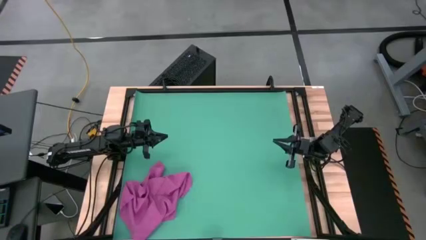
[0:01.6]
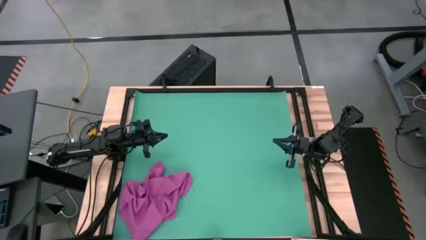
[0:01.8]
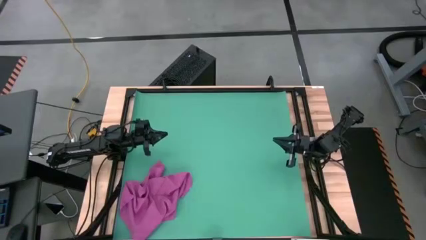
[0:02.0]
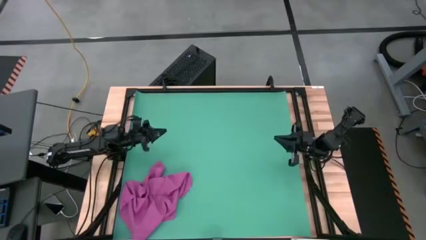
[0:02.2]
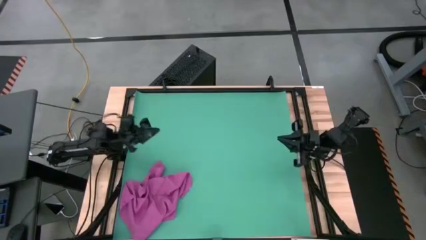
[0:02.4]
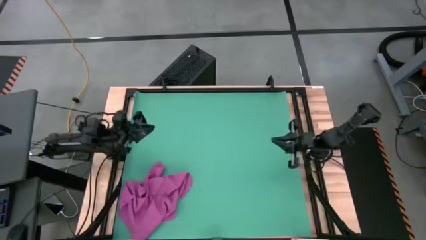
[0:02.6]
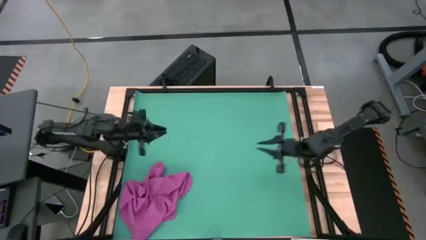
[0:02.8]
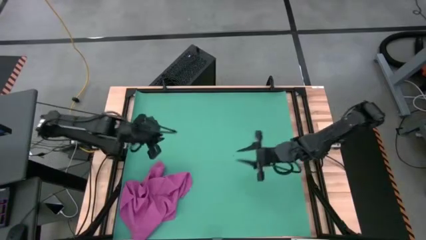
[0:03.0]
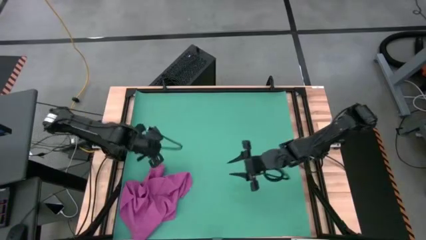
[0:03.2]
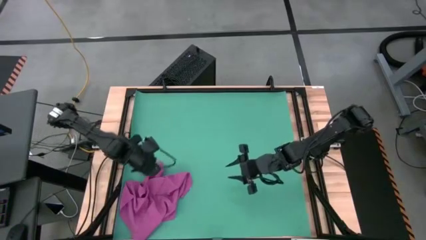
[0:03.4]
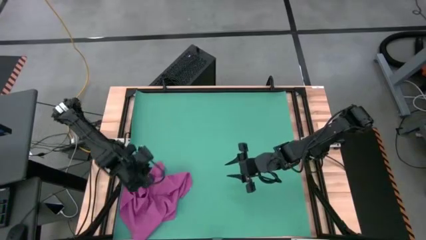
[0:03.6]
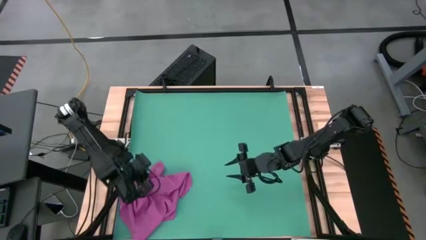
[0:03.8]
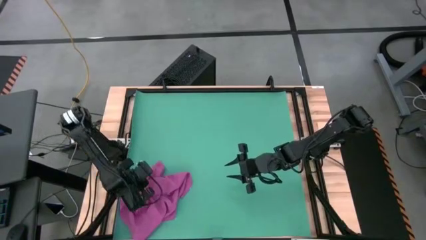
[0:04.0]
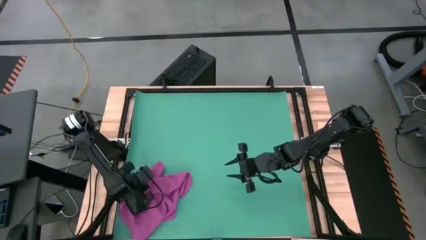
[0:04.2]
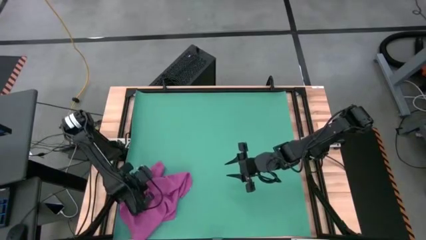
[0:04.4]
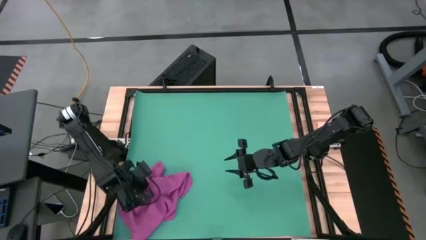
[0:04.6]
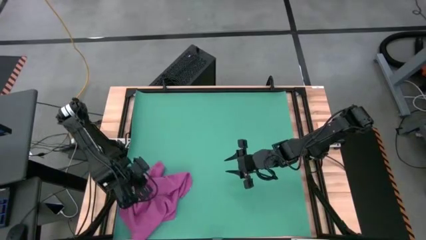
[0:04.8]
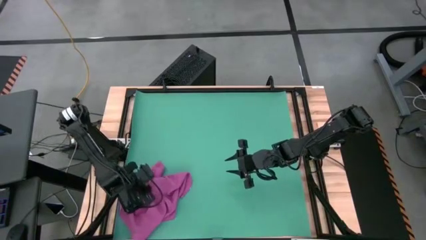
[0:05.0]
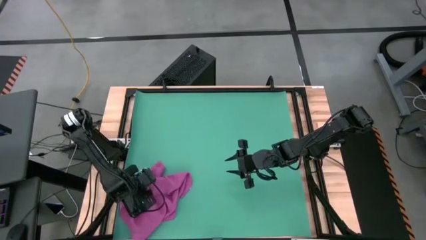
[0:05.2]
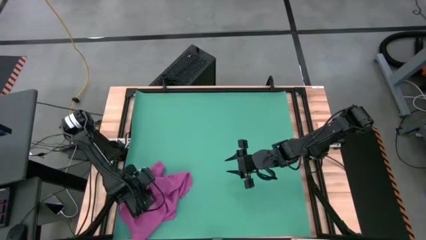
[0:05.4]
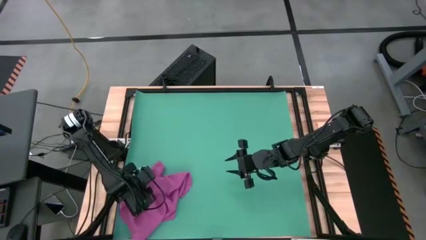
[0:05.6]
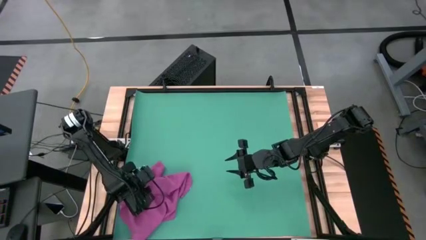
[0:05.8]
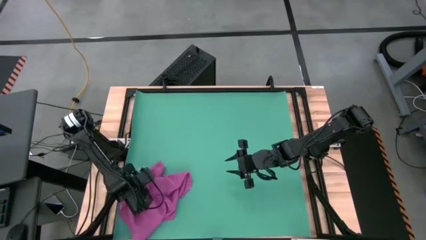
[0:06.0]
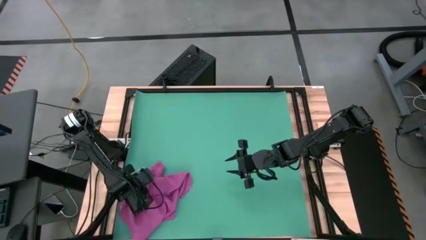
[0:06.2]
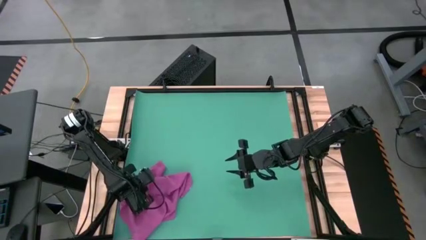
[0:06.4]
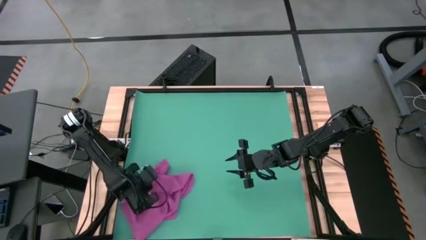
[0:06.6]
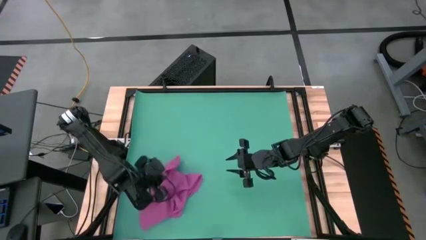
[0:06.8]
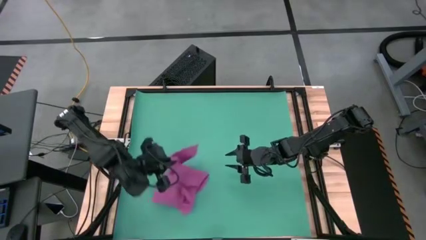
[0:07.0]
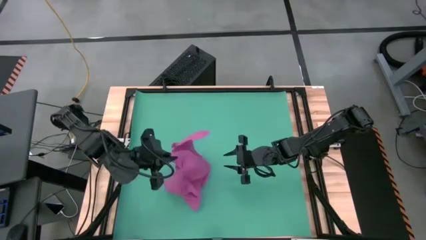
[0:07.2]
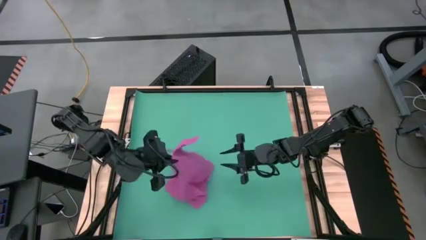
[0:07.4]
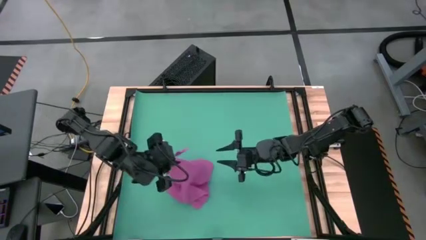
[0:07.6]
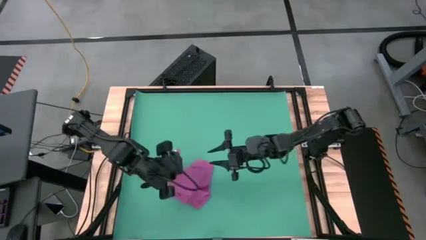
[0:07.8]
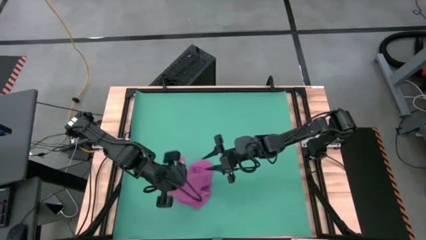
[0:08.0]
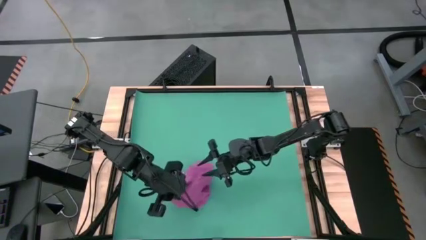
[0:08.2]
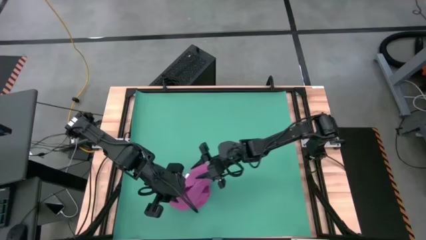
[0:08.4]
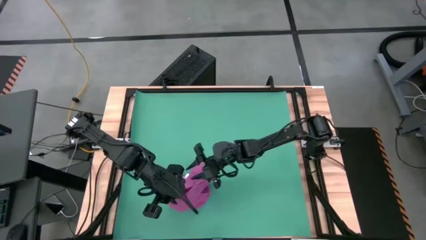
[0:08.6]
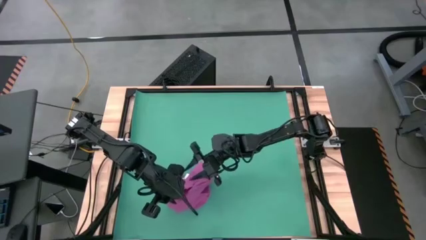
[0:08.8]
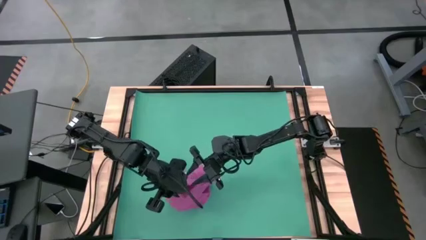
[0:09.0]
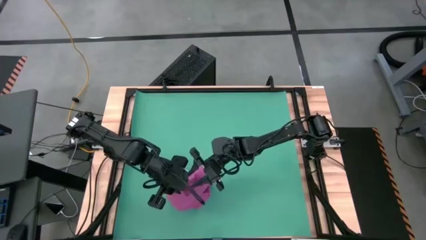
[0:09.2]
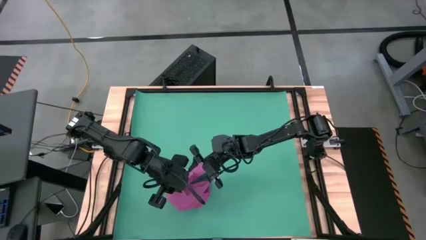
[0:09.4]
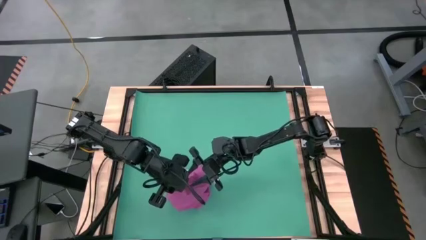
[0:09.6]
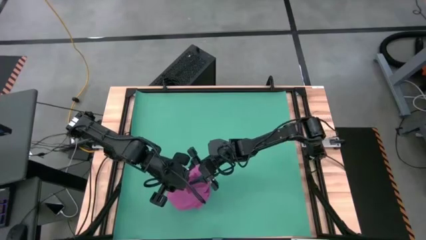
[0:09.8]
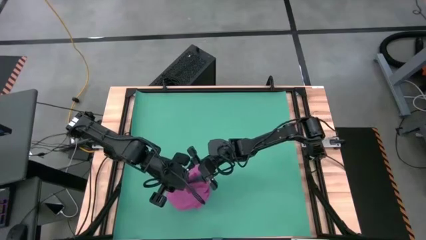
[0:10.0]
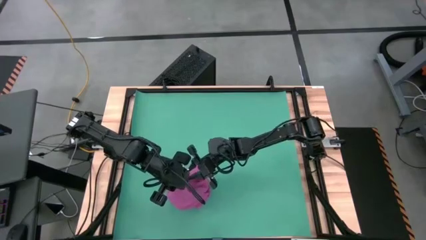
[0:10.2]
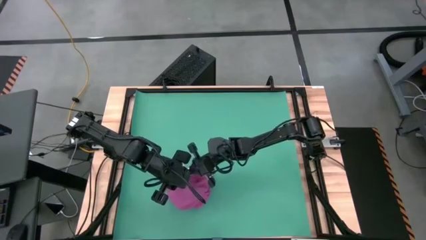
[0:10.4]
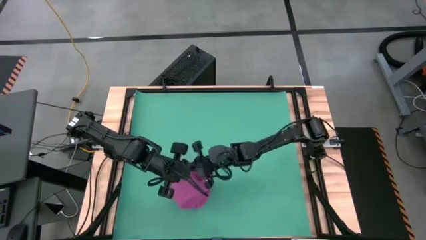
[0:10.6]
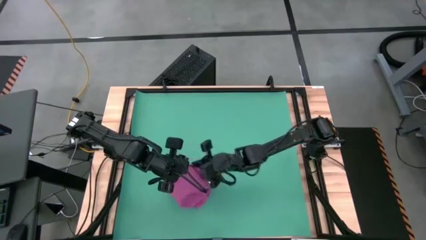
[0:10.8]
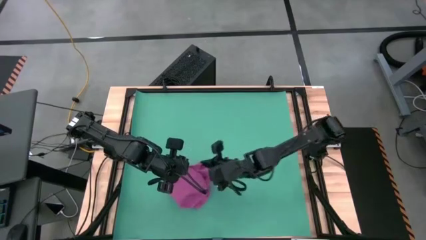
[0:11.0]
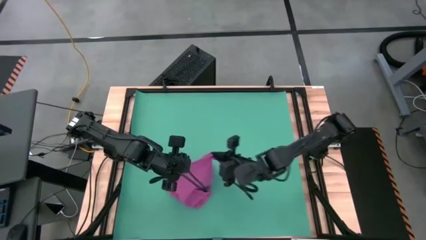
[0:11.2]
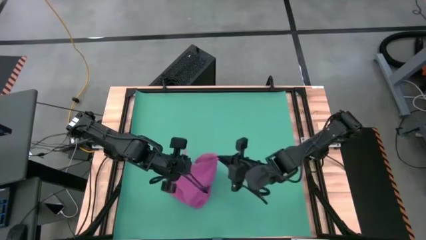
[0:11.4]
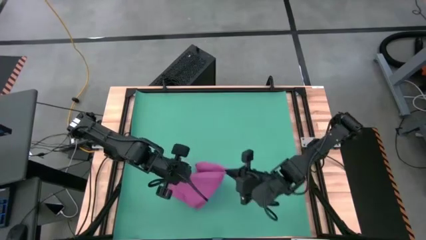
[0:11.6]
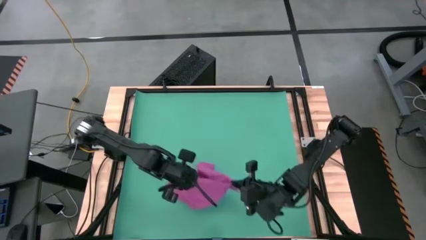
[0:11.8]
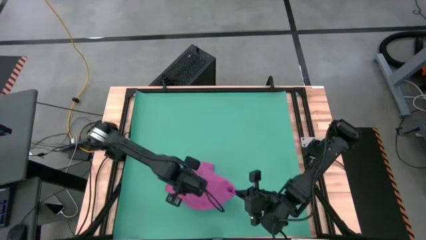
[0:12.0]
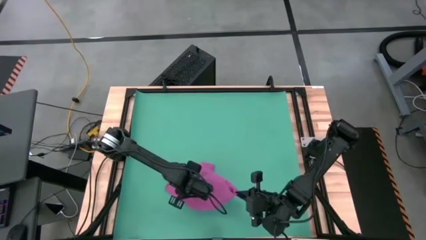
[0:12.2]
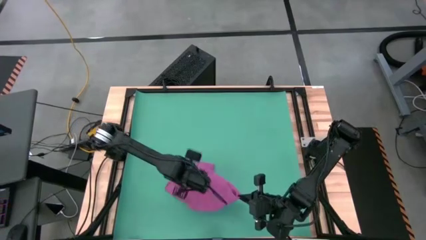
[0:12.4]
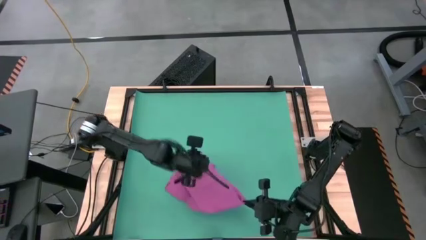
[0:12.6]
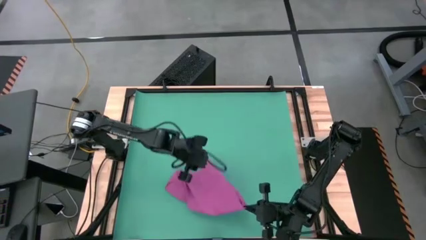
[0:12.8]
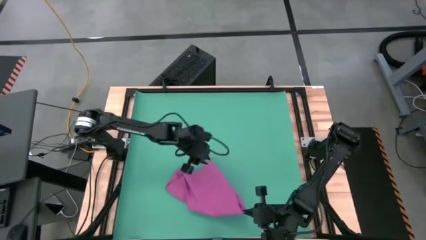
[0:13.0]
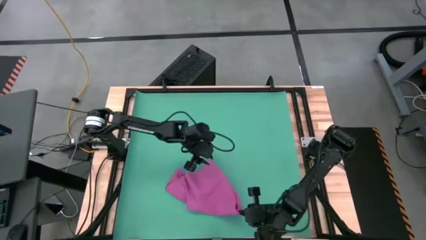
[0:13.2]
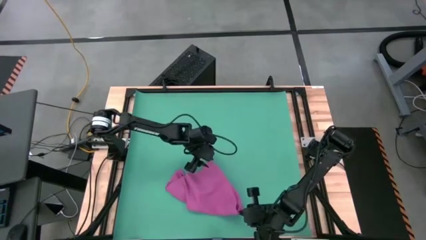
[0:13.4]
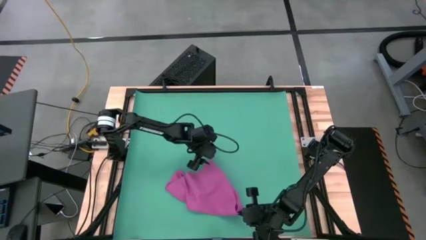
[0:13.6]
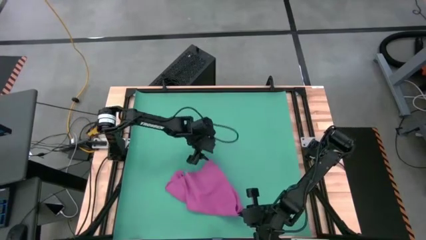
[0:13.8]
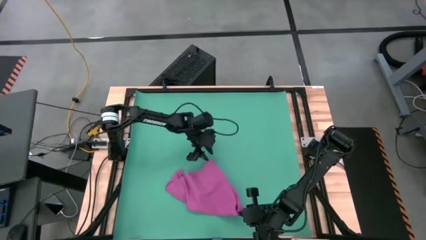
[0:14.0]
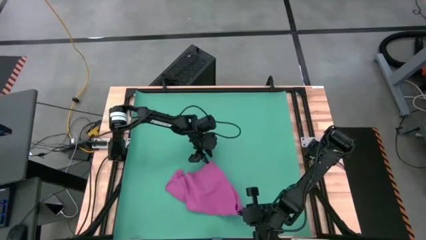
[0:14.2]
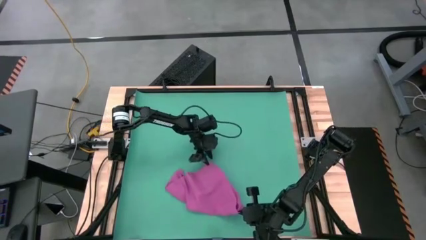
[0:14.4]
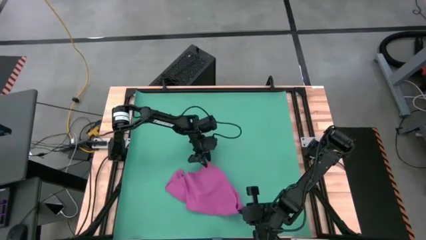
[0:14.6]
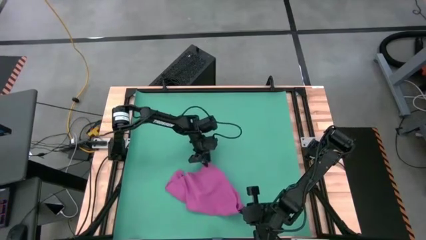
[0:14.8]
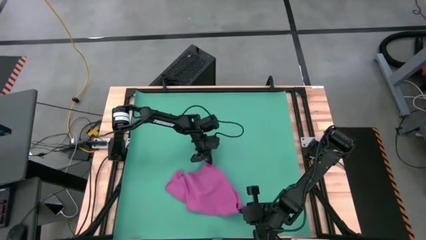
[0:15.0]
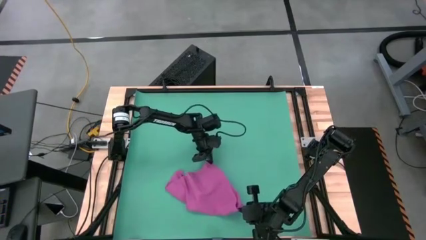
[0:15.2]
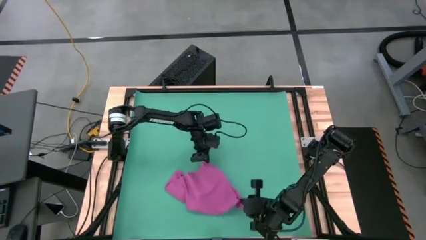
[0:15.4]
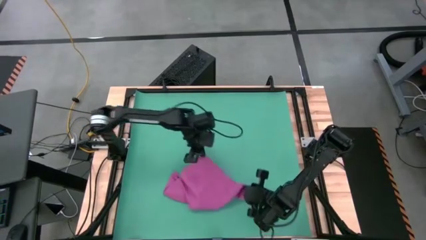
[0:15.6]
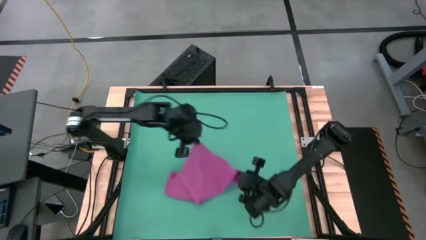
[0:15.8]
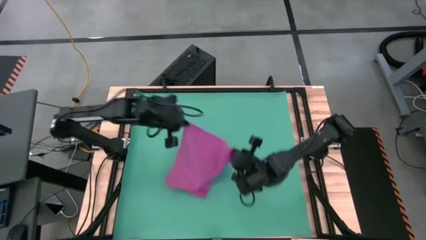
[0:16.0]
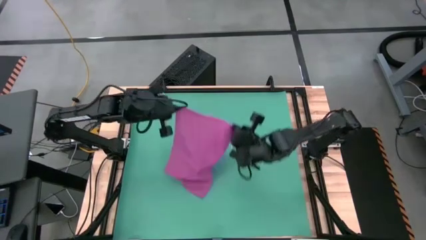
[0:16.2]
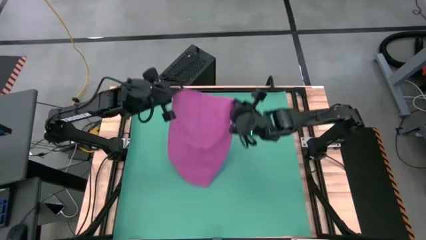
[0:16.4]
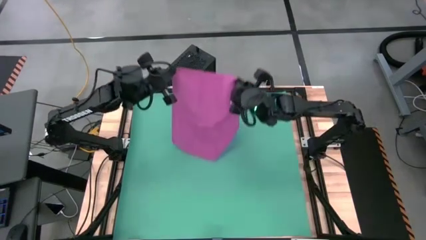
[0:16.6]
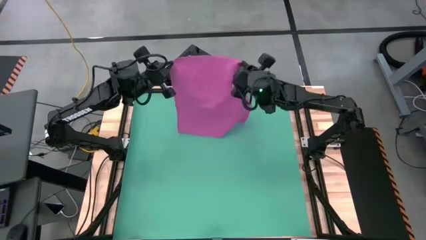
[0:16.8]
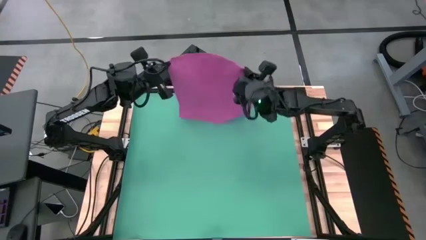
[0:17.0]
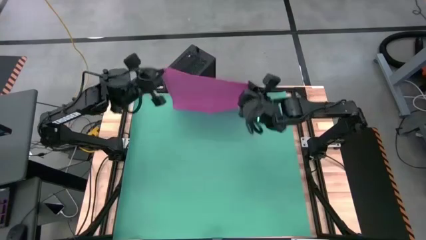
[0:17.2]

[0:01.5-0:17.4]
Task: Roll towel
Roll the pink towel

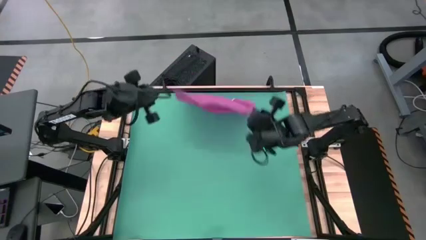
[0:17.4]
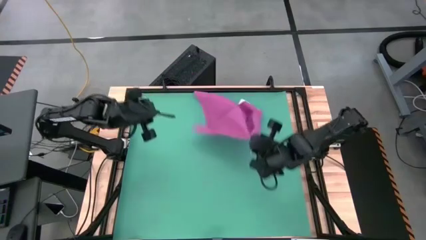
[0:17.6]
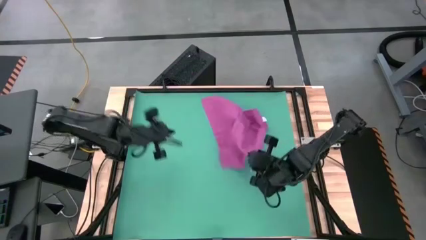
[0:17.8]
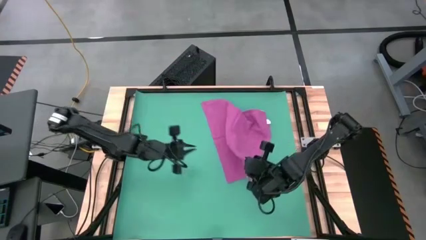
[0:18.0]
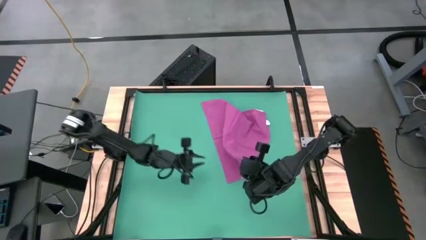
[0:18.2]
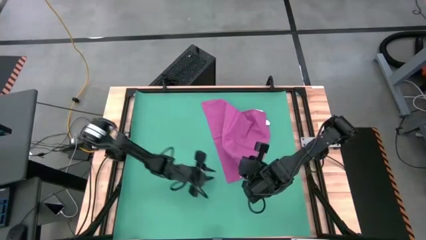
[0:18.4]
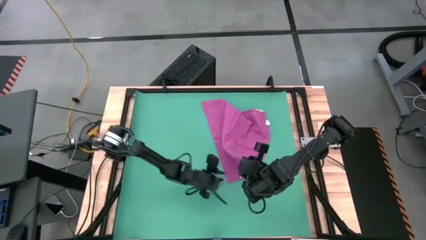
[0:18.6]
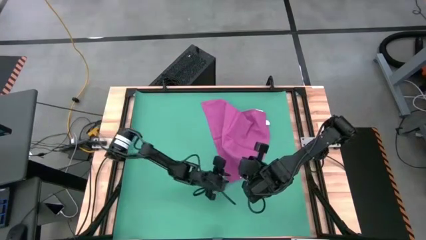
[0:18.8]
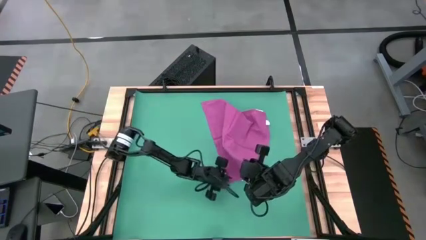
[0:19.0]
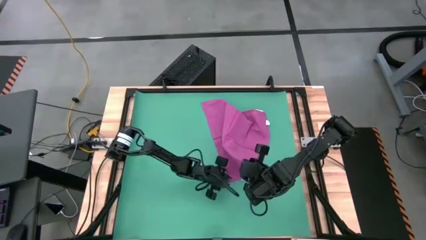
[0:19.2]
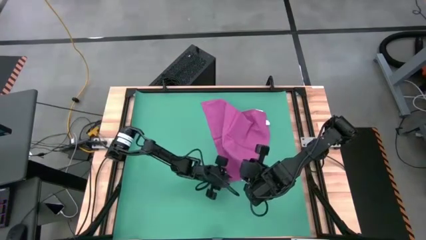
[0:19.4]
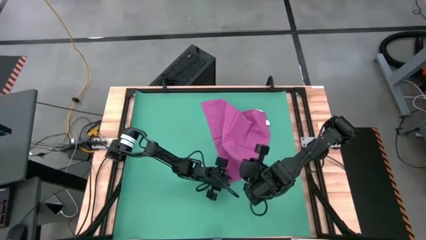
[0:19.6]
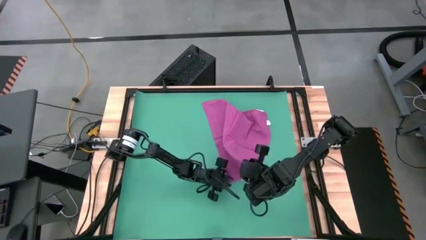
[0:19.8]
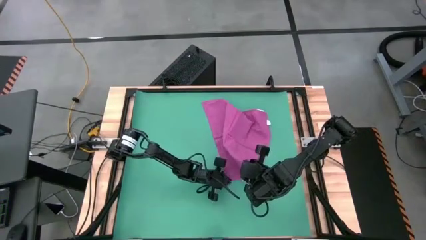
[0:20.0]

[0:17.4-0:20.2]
Roll the pink towel
